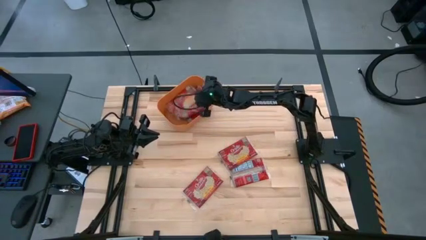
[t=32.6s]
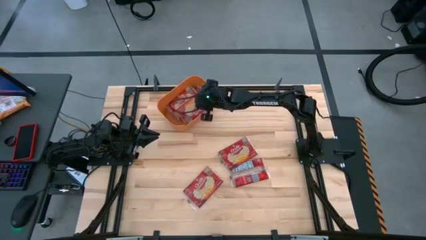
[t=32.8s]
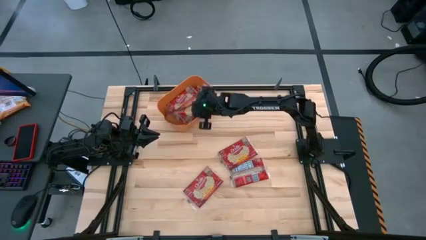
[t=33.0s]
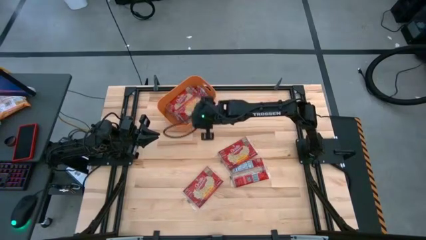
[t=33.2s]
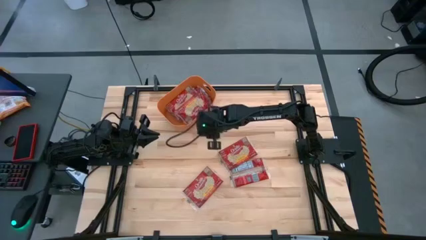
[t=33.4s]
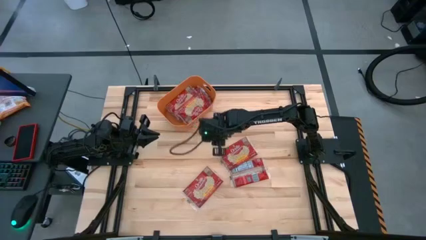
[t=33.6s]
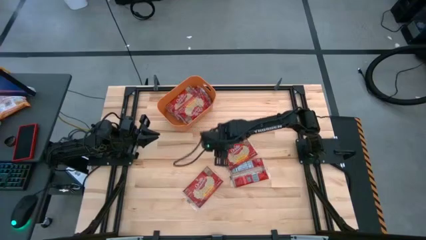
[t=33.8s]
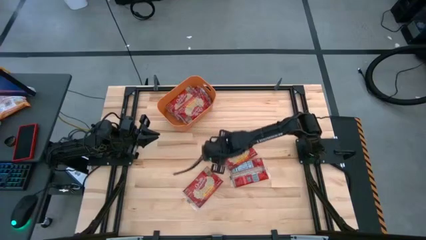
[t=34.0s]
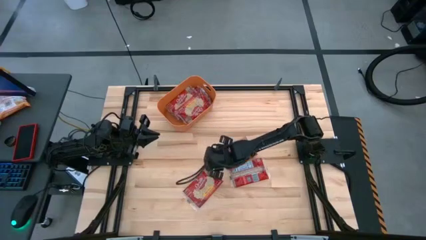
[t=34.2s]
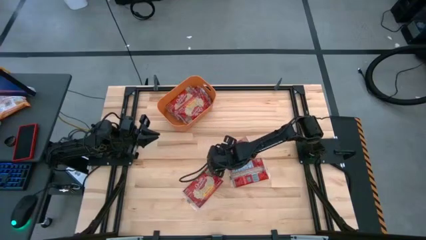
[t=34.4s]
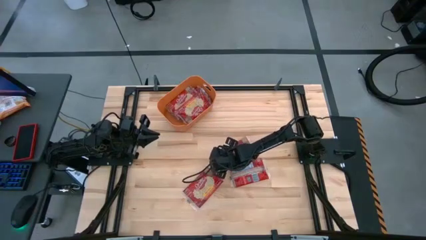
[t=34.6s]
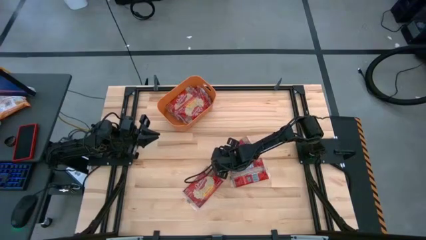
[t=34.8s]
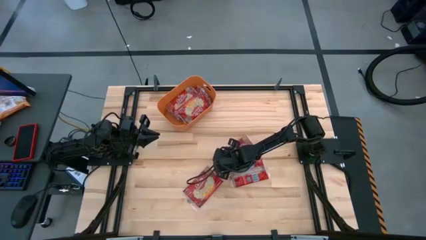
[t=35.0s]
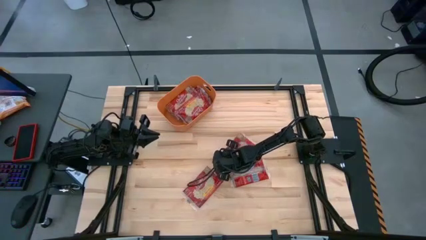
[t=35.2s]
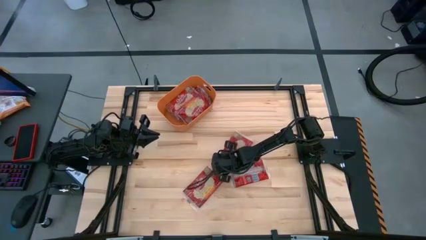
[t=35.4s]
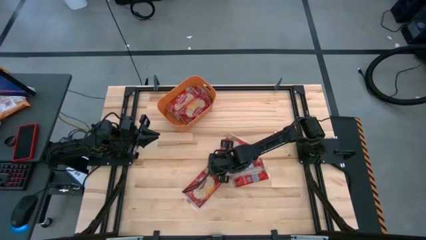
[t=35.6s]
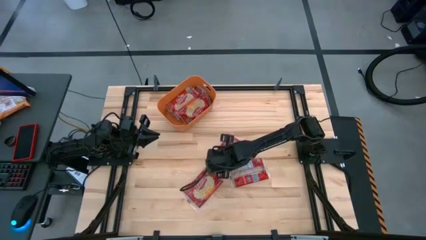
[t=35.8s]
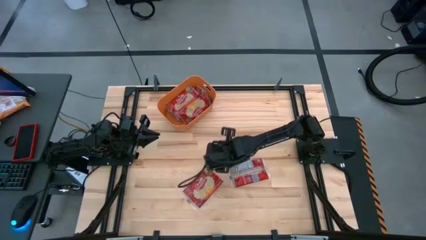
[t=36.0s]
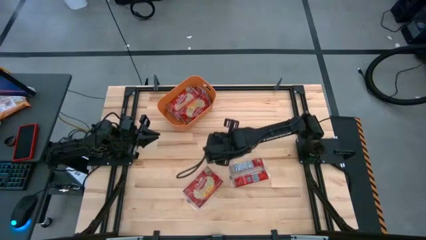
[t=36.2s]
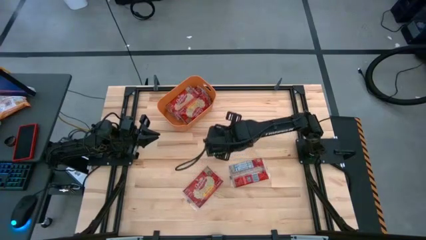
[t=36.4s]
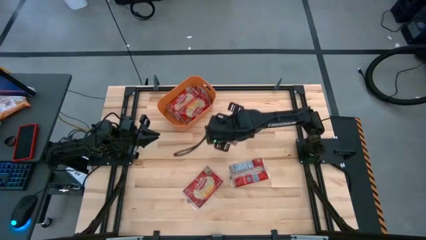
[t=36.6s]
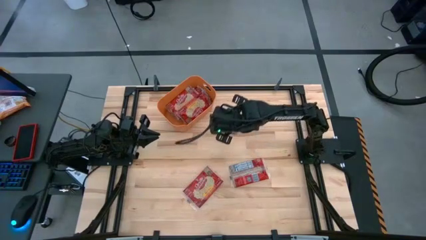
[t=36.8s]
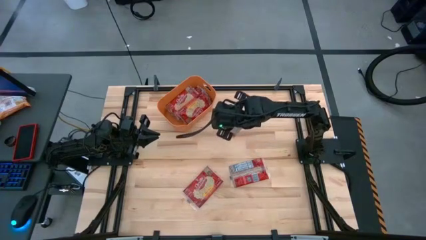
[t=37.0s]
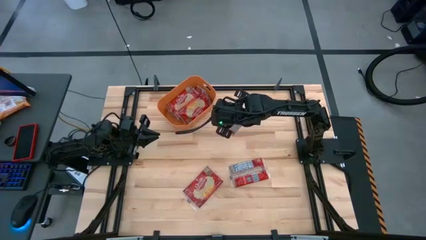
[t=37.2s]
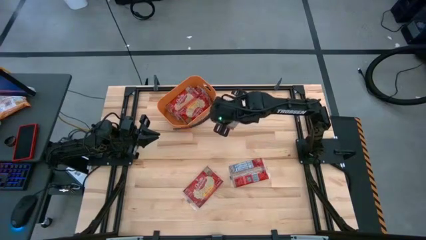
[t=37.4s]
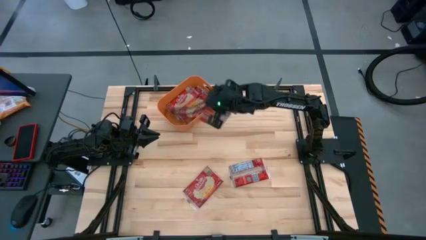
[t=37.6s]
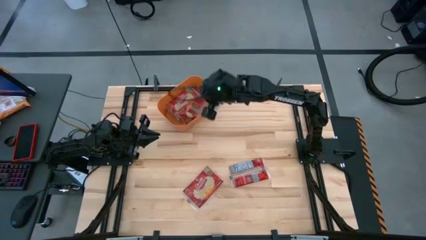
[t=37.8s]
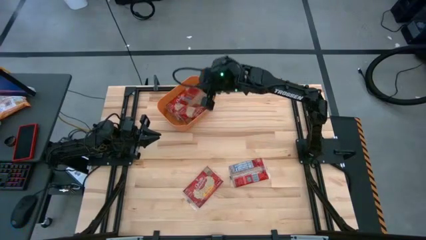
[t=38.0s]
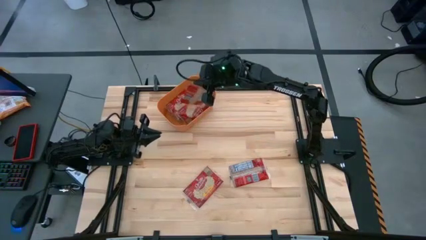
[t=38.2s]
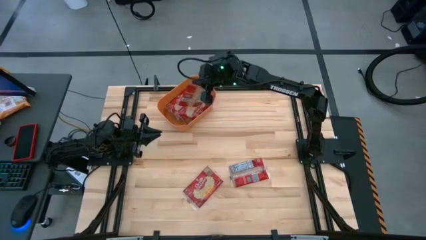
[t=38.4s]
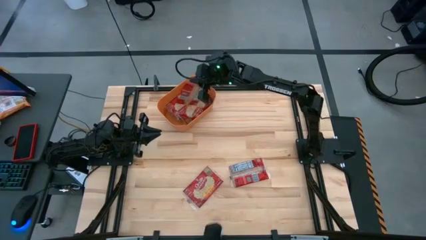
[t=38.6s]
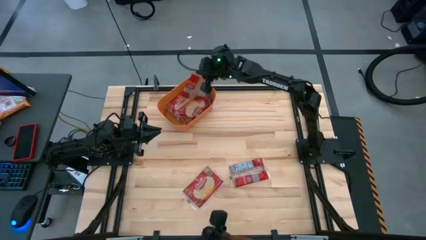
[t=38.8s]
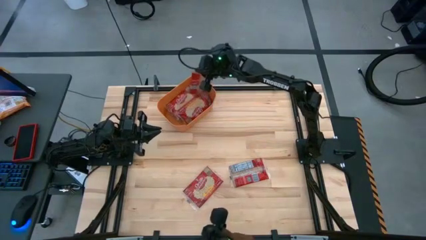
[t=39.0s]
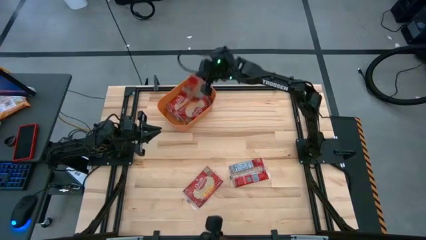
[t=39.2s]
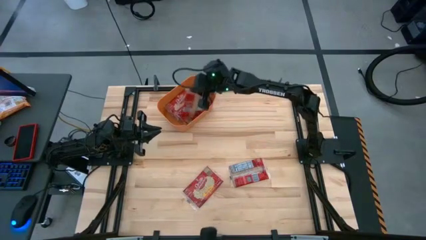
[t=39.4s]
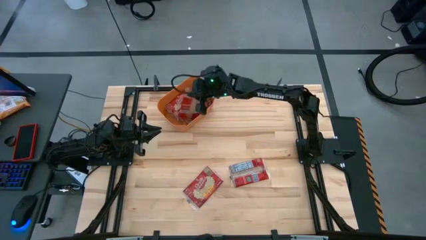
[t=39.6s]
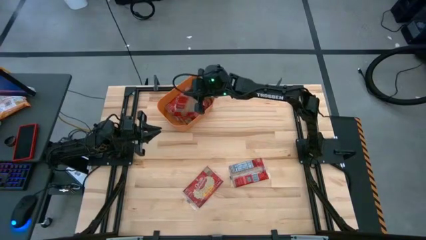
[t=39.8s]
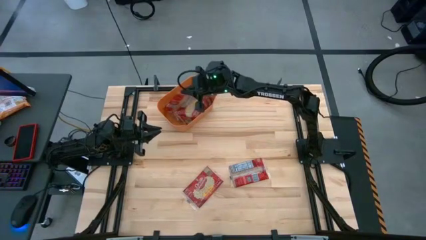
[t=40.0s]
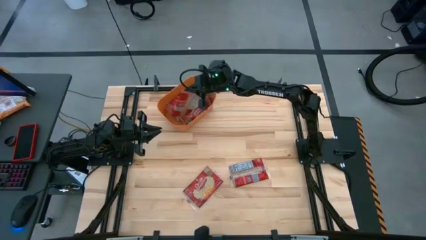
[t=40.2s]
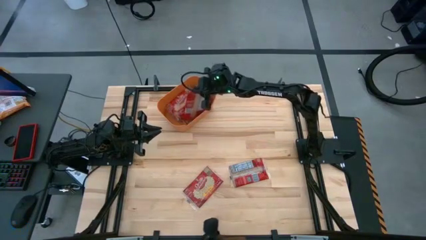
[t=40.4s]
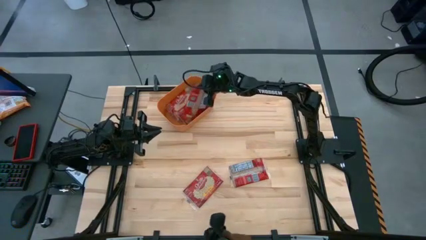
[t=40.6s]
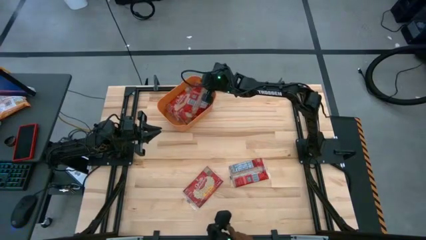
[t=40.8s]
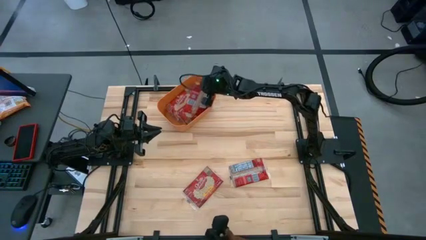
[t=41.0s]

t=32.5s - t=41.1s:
Task: Sort popcorn bags into baskets
Put the red popcorn bag into the orange bin

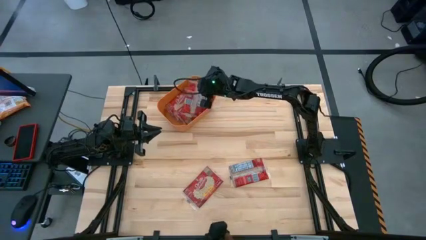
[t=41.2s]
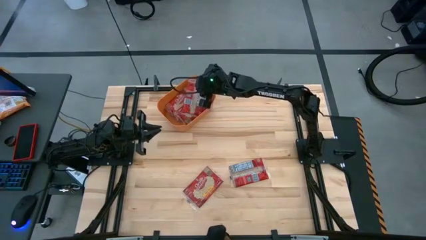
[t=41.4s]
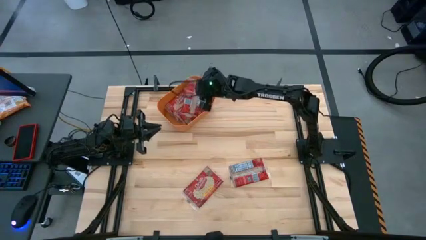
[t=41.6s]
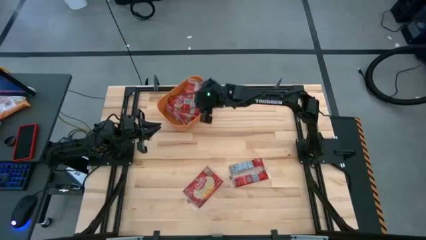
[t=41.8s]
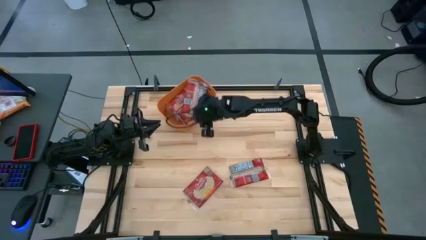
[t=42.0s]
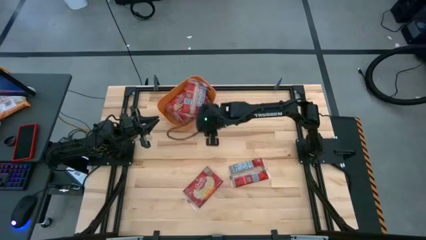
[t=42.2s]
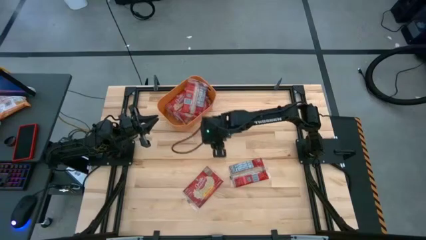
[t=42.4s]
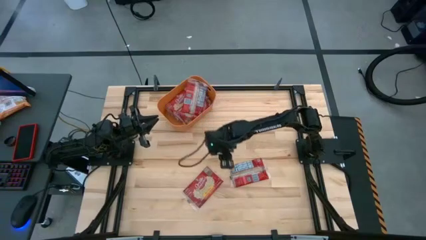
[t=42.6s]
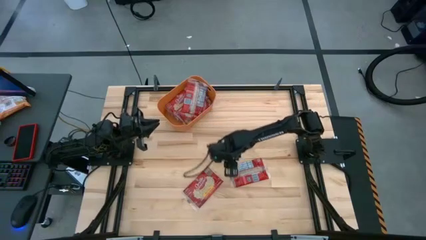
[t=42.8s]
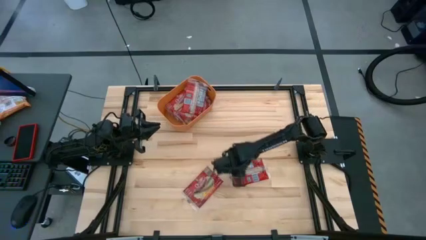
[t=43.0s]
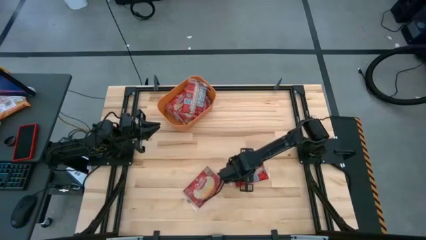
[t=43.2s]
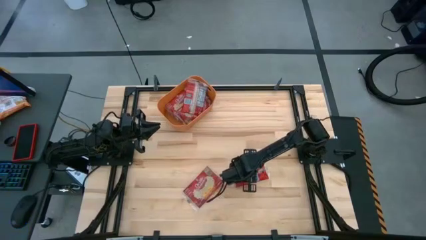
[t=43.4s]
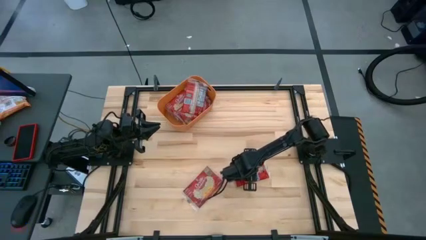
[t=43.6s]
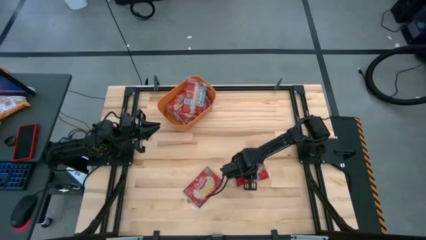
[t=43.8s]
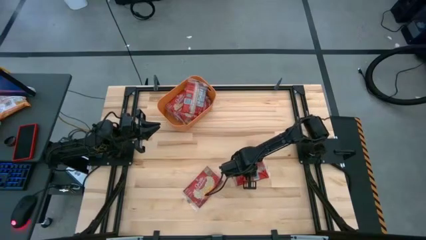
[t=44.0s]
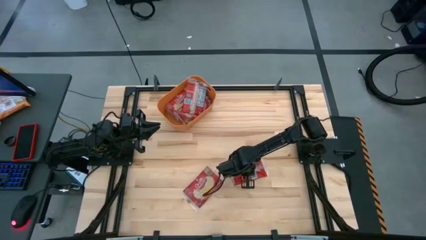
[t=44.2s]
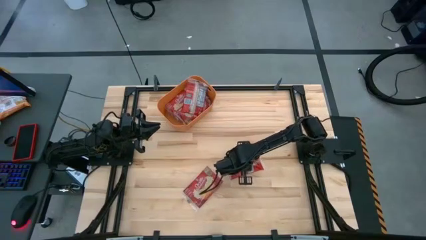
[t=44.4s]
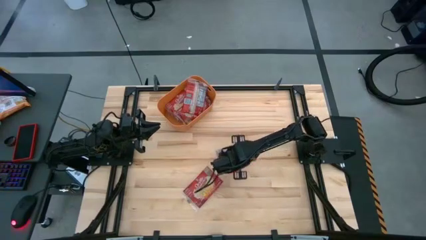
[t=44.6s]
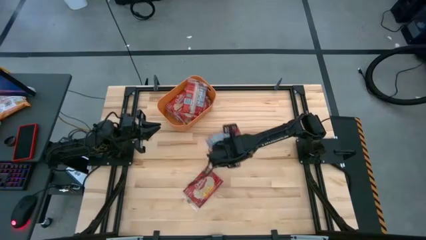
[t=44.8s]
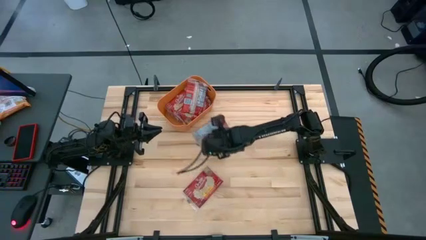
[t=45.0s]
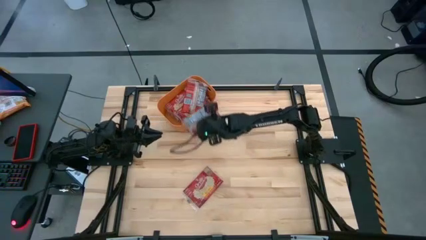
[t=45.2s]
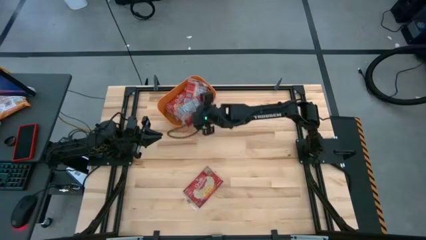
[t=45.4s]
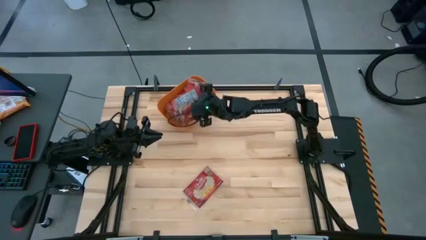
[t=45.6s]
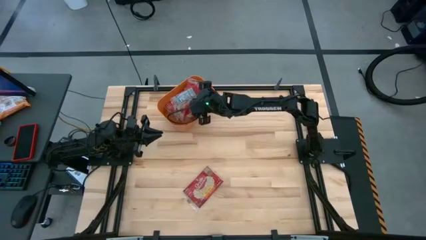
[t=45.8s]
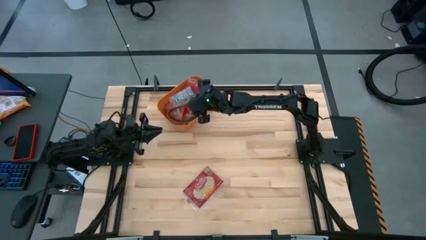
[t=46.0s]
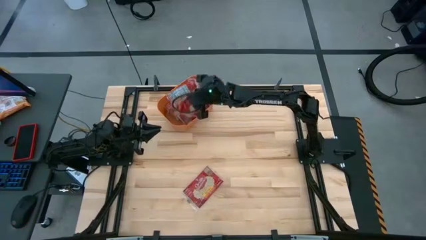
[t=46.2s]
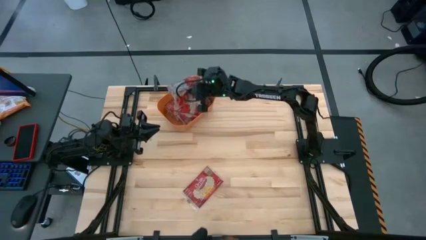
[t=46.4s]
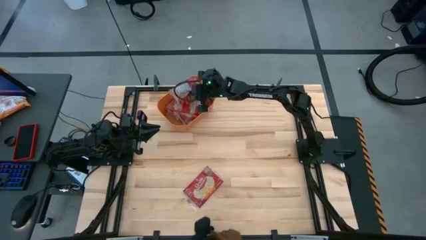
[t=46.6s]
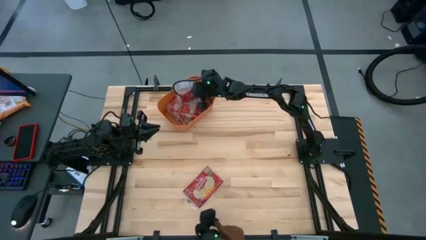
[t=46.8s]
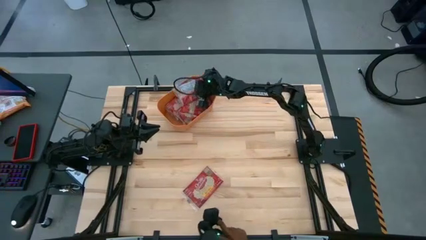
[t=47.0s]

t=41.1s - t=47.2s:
Put the red popcorn bag into the orange bin
